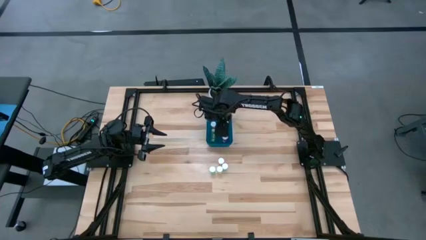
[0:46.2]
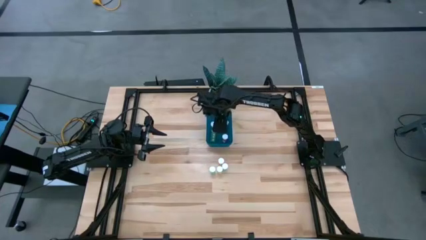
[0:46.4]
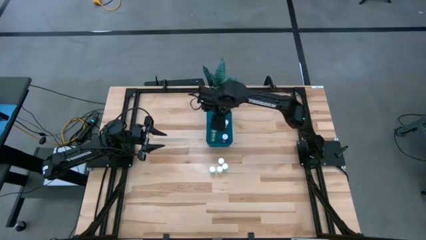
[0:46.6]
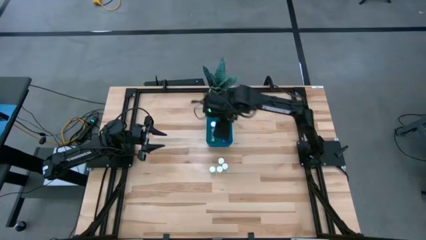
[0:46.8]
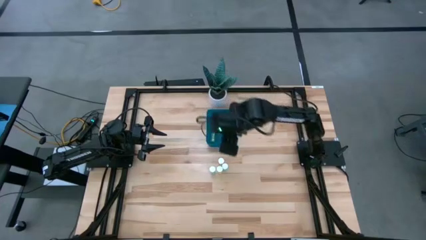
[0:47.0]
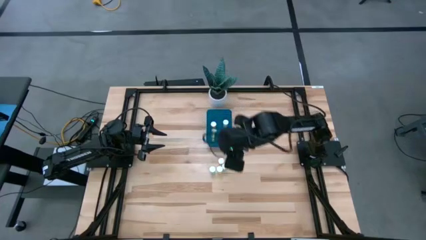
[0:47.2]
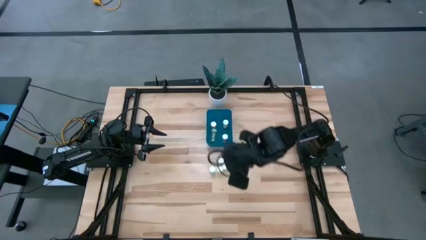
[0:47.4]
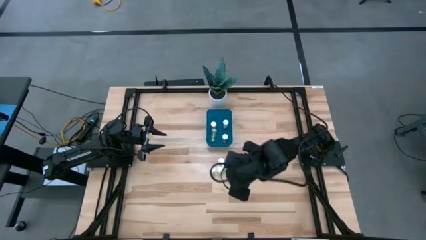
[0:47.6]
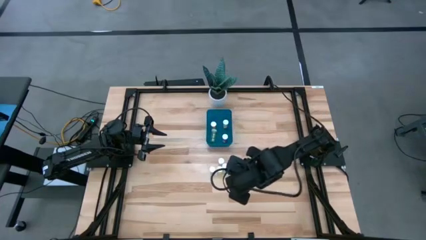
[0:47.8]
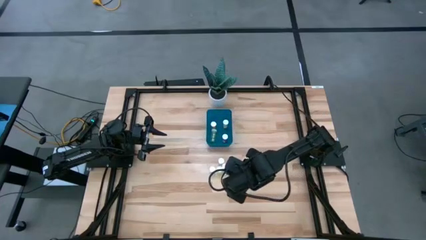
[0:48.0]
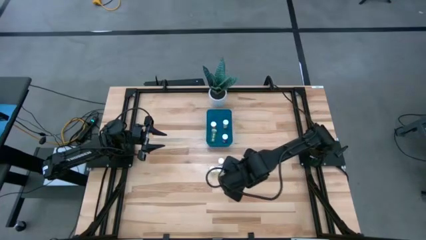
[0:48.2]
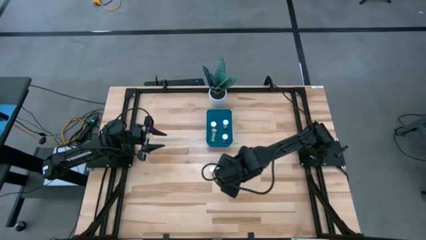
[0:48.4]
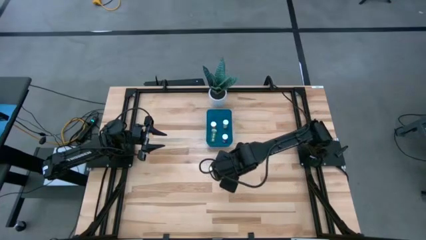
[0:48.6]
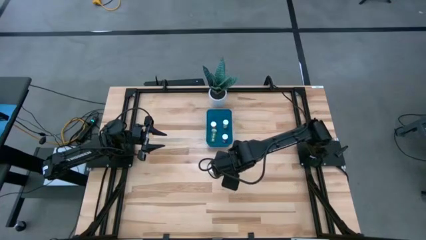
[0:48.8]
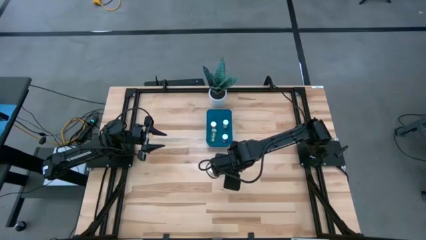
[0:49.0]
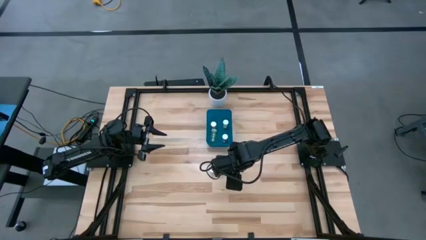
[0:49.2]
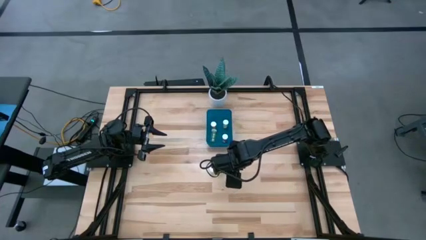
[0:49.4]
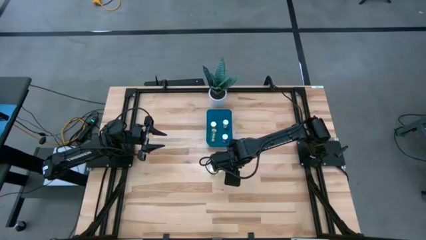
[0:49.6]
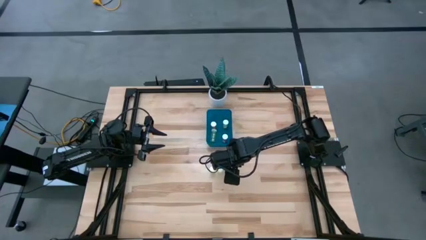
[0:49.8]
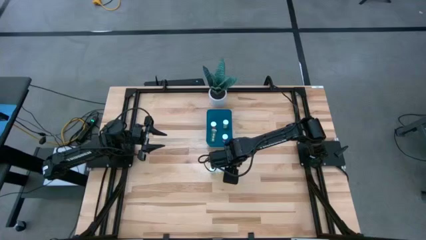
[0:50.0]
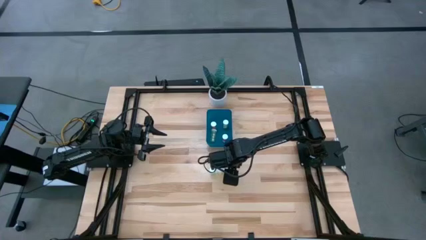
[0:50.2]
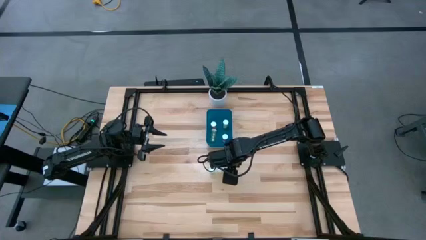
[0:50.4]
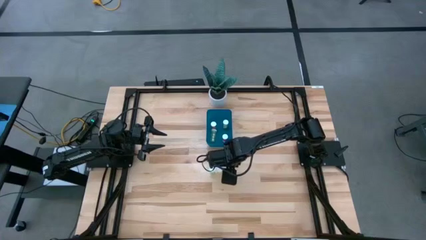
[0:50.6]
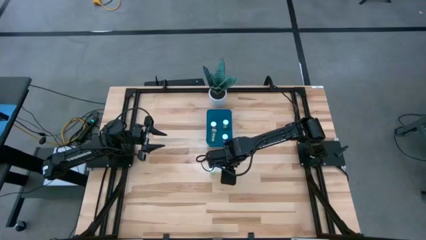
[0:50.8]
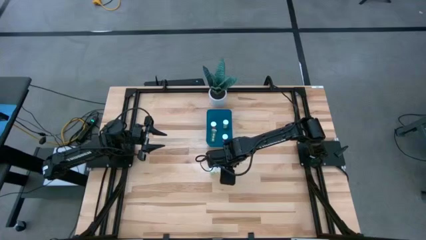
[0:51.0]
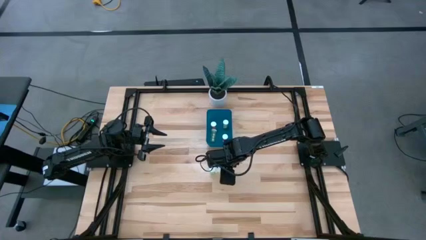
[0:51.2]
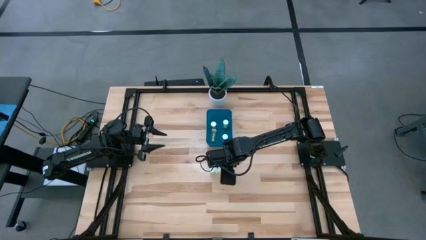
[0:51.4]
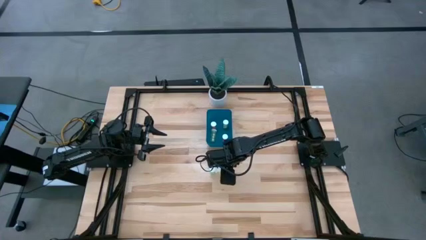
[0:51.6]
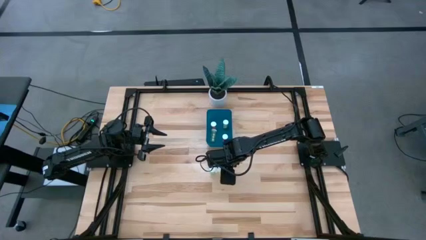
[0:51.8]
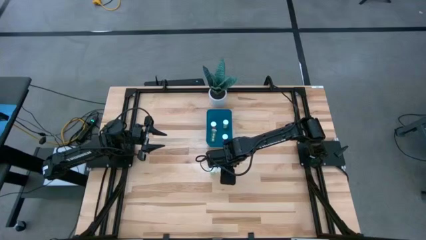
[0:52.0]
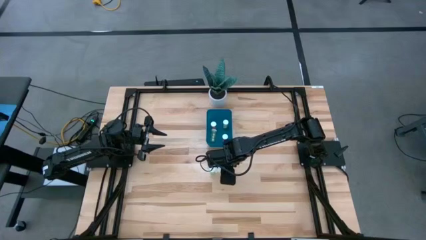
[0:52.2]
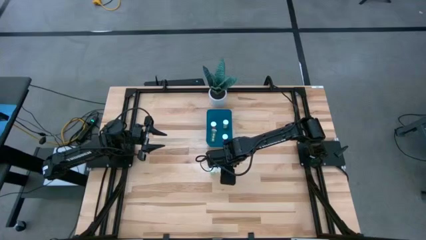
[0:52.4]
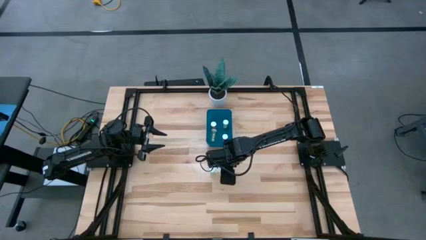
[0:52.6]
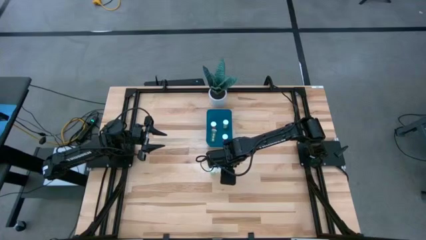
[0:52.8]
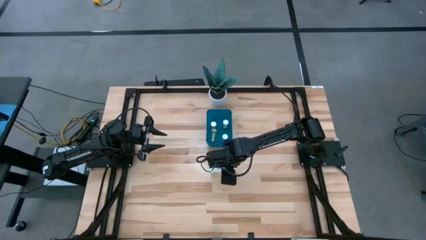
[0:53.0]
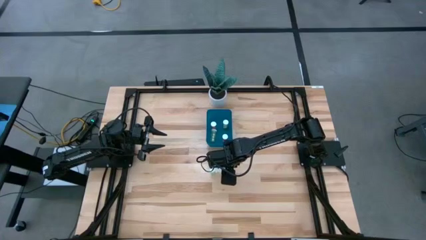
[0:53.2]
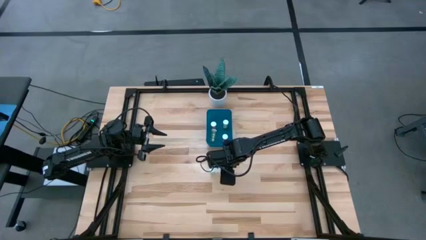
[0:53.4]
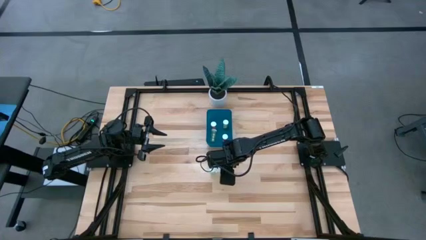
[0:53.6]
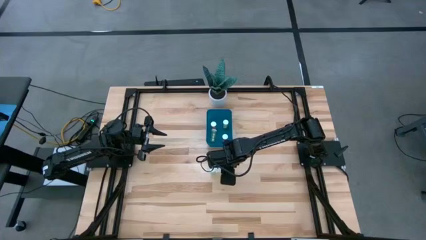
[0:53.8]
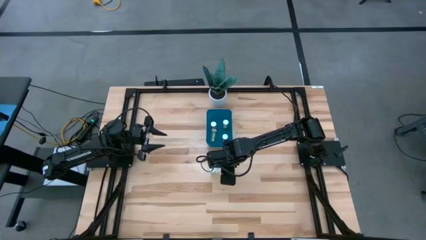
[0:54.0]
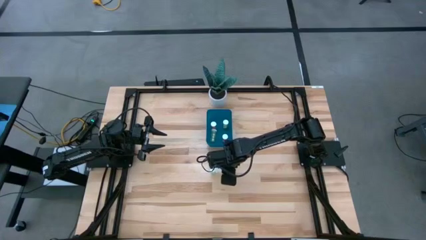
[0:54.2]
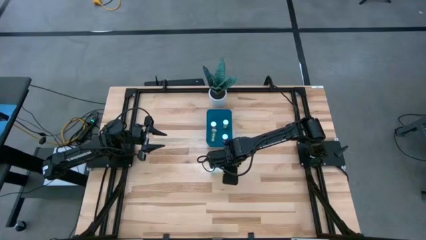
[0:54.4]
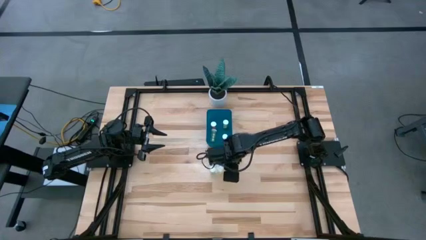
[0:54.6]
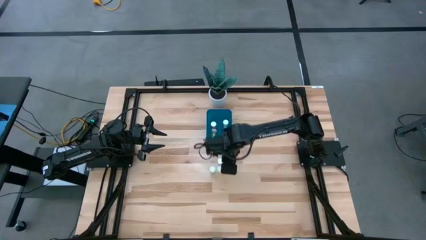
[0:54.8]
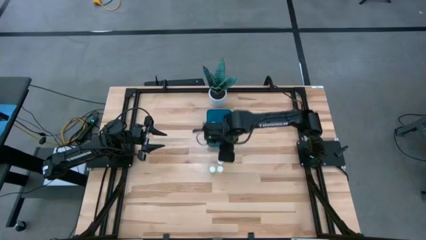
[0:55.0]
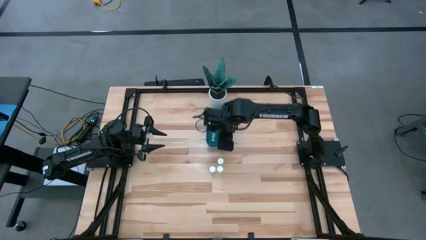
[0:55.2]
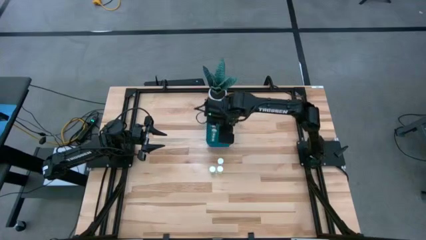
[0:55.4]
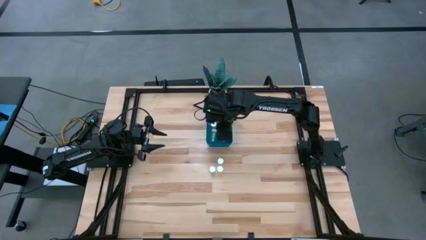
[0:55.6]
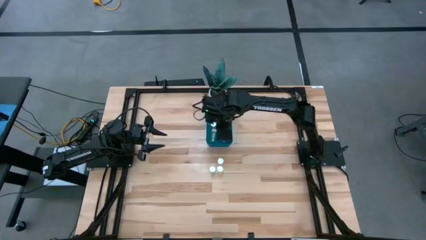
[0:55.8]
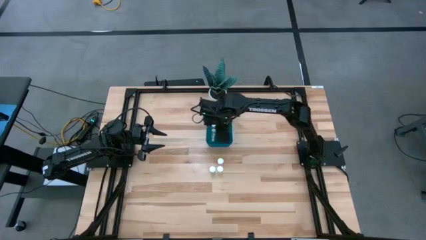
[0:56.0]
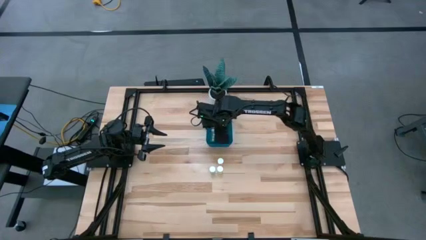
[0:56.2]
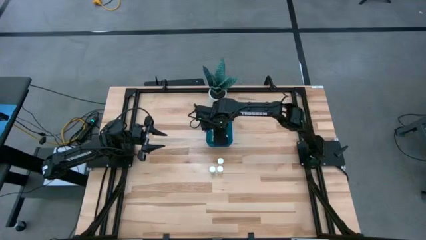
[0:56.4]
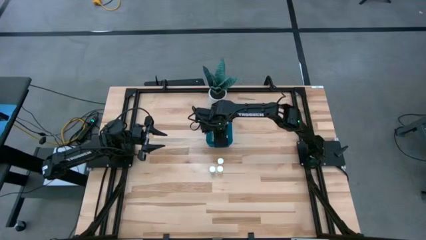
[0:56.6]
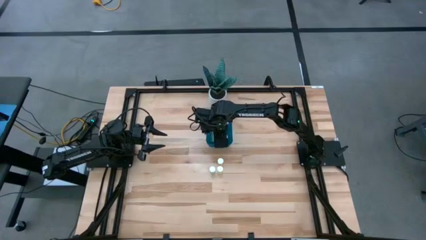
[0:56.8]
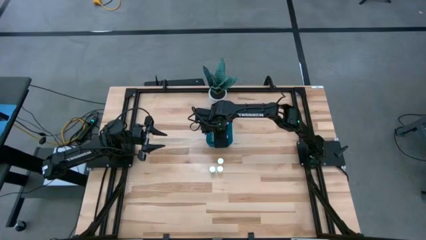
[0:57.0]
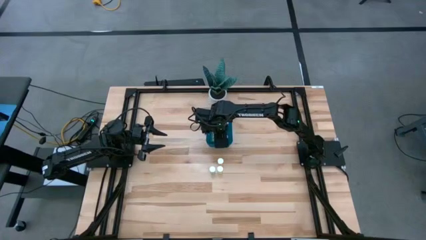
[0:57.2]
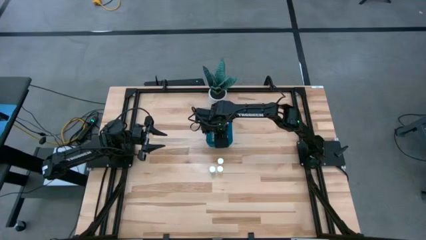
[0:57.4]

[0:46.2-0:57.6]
Task: Pick and place pill bottles into a basket
Put the right blue tablet bottle into the bin
